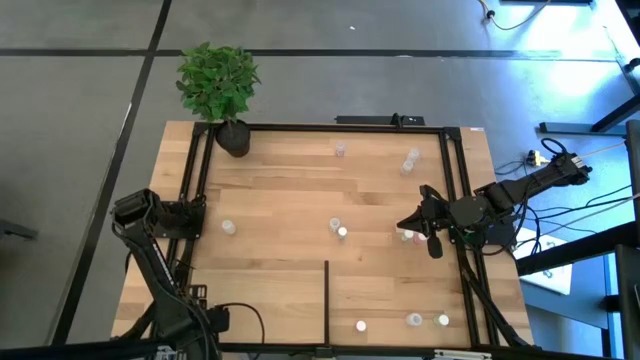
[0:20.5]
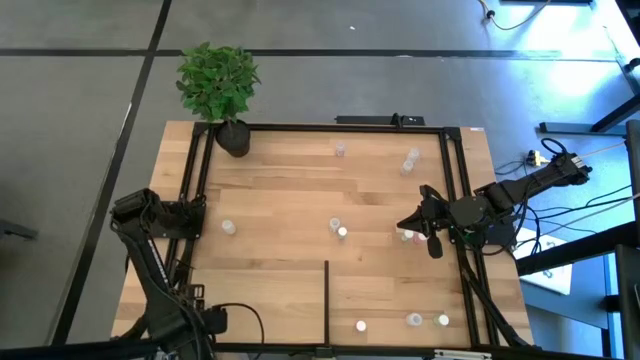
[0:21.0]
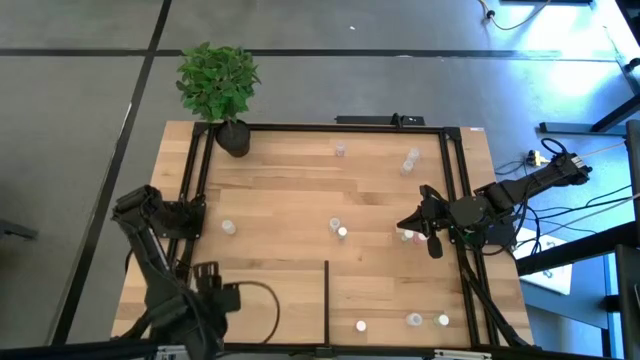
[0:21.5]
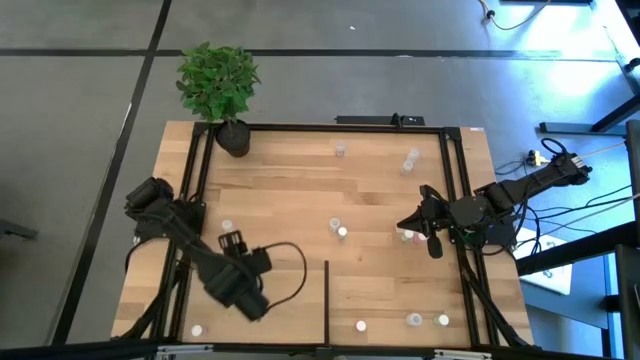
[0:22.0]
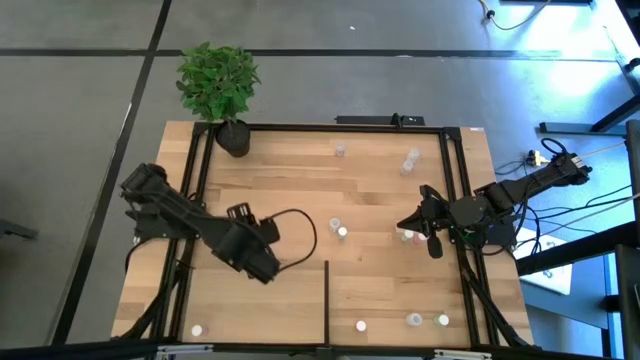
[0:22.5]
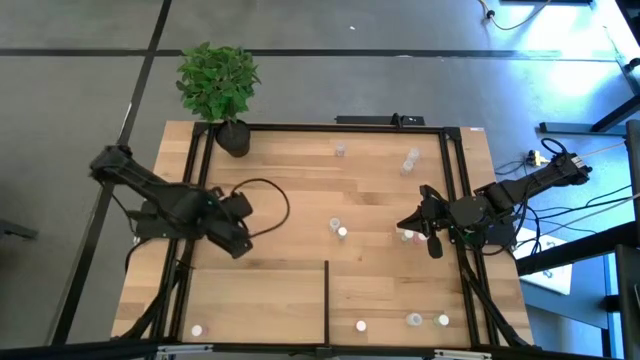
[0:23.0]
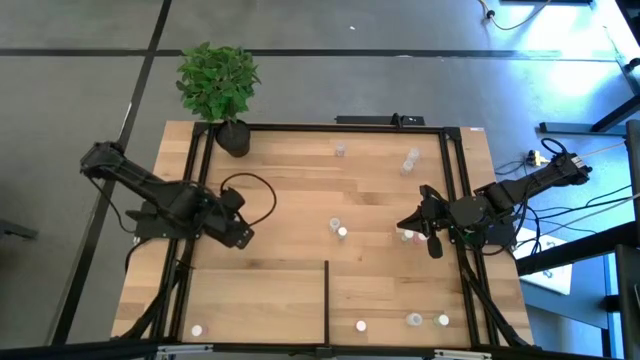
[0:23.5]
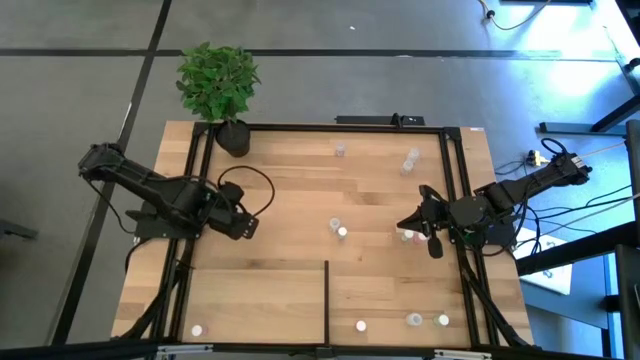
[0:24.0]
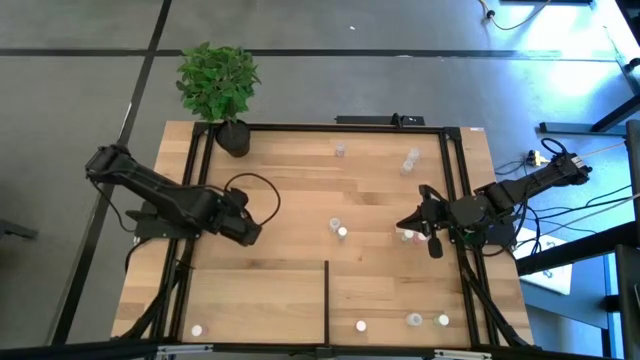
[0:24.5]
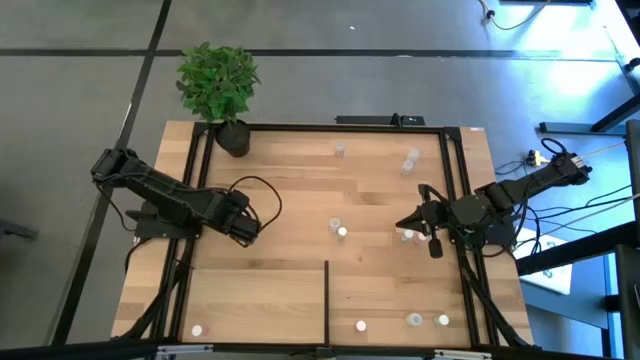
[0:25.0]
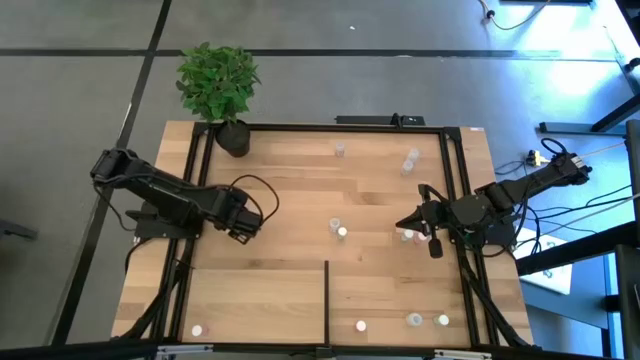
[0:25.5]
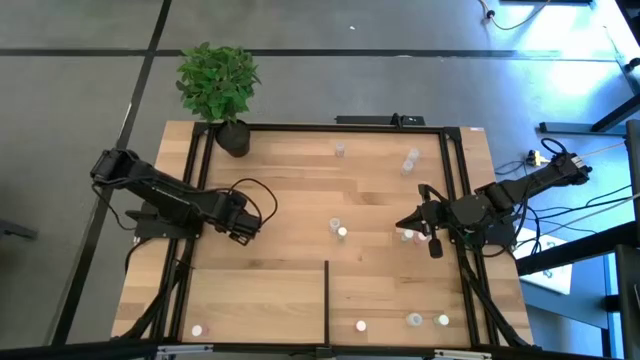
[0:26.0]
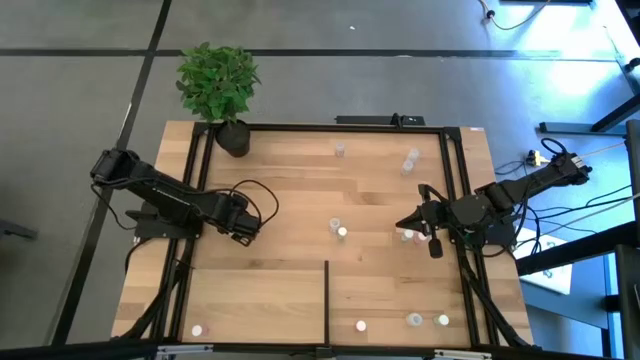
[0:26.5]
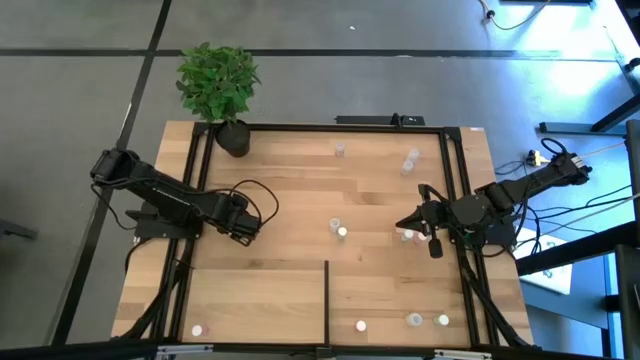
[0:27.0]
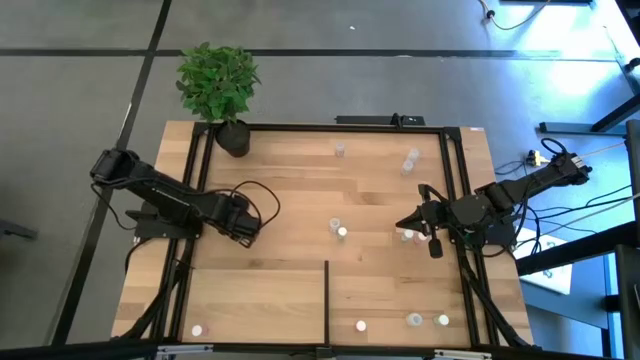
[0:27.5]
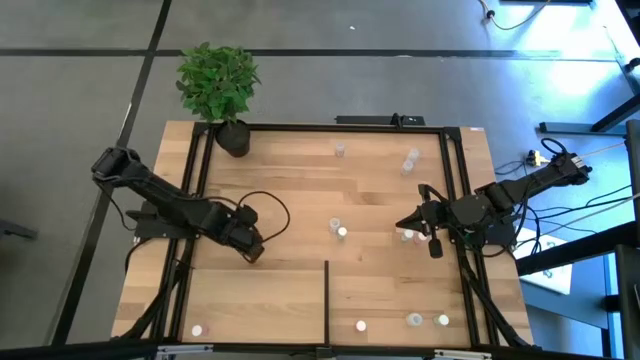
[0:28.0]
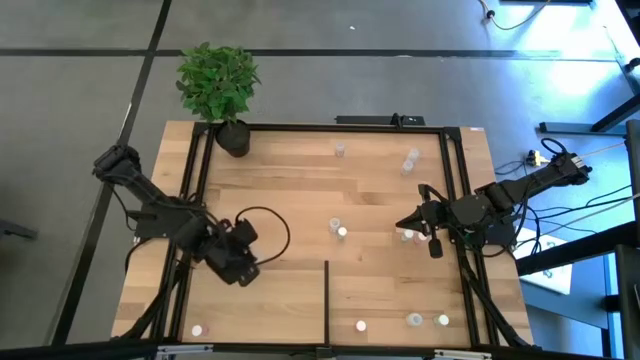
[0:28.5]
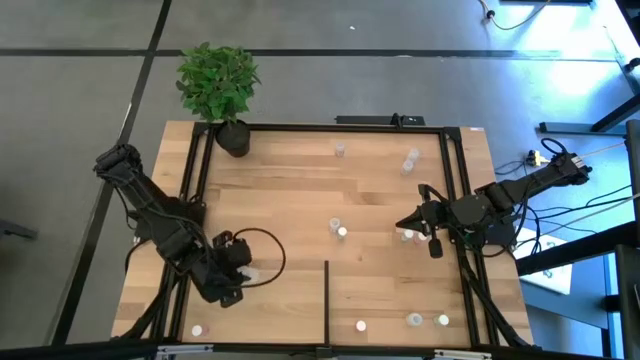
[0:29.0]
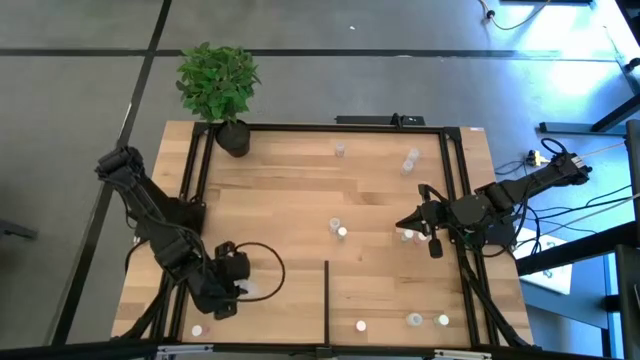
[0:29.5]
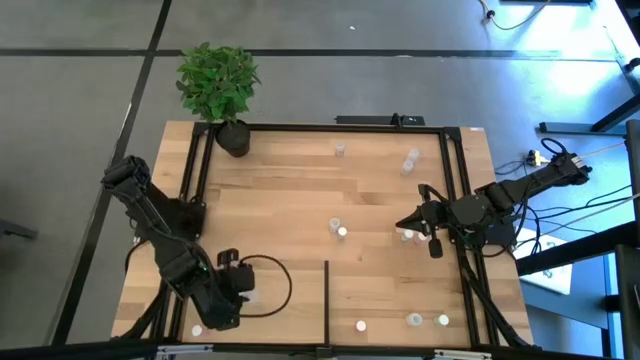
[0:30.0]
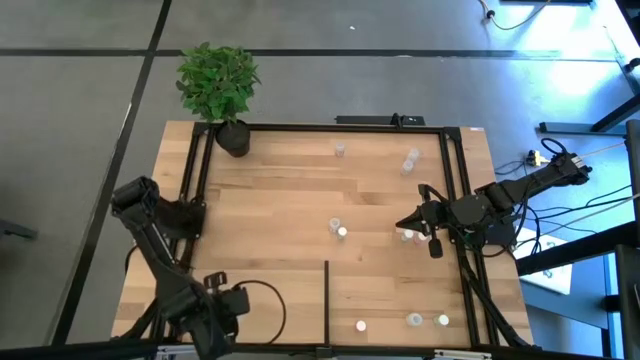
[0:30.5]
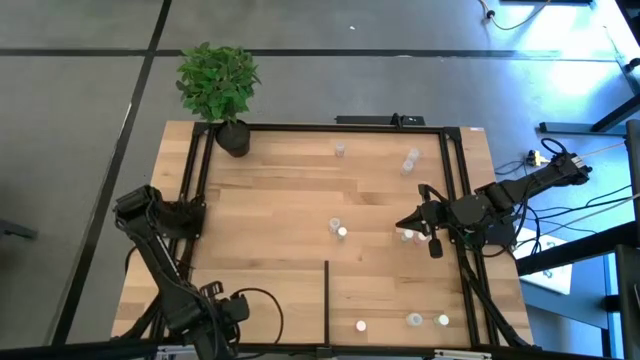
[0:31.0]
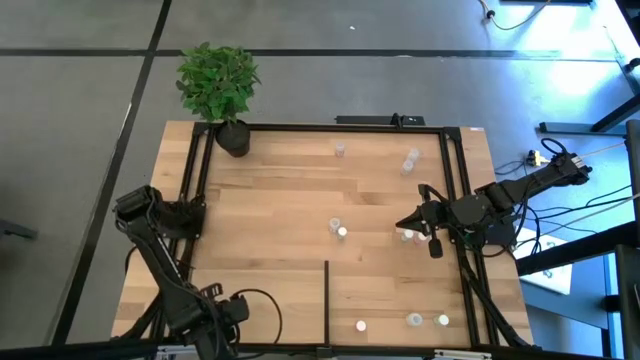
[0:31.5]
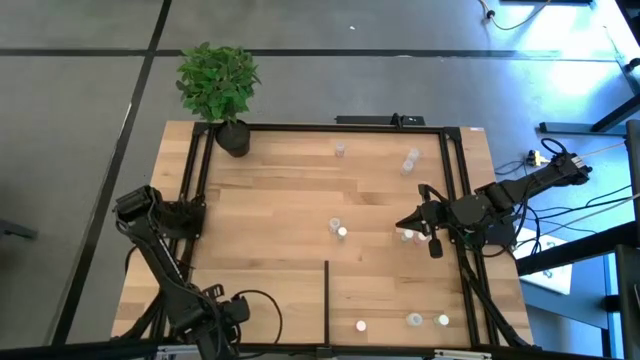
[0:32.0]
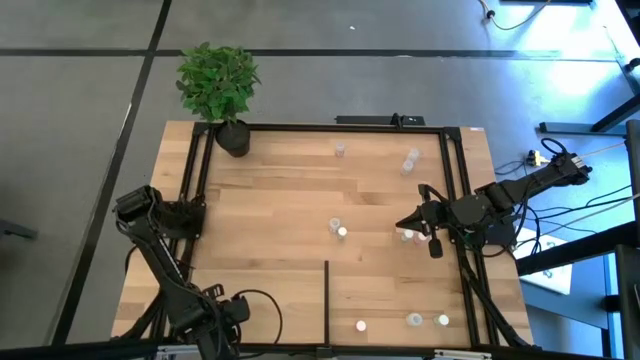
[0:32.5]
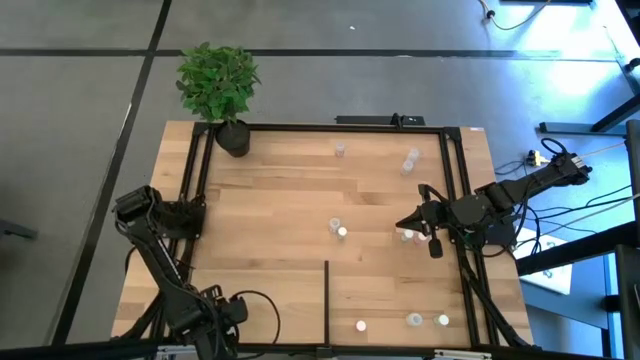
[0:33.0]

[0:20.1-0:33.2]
Task: Pick and place medicine bottles onto shelf by color
Put the middle white pill bottle on the shelf

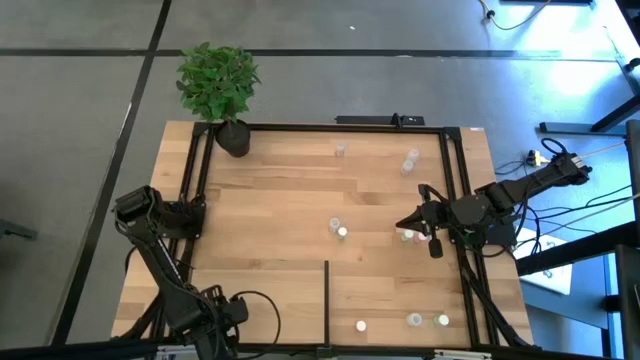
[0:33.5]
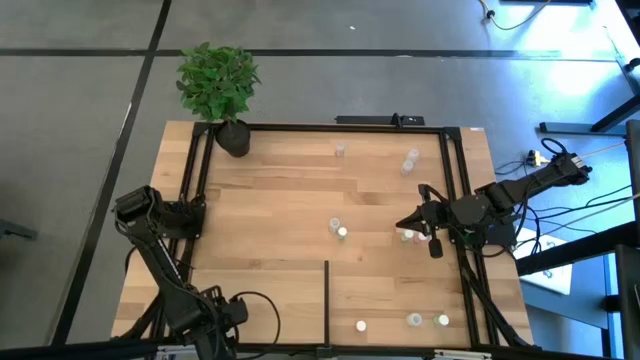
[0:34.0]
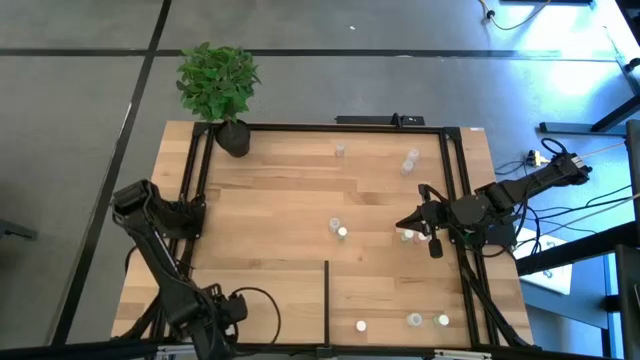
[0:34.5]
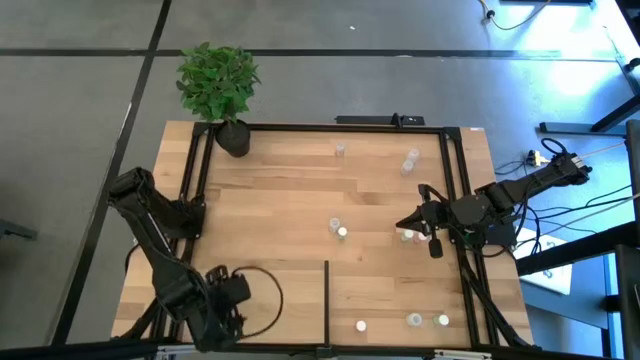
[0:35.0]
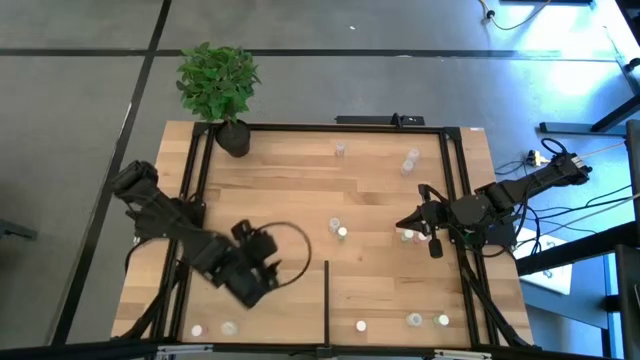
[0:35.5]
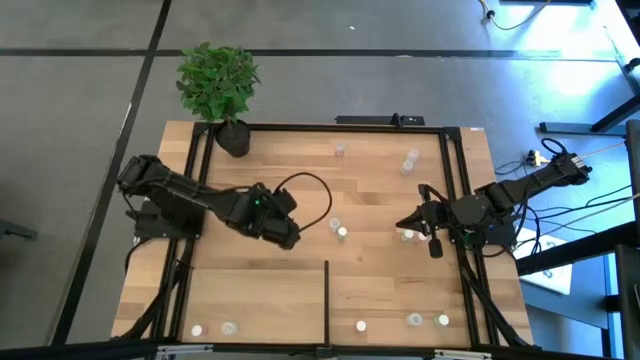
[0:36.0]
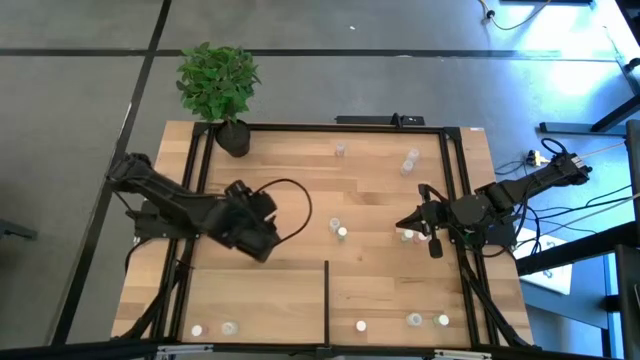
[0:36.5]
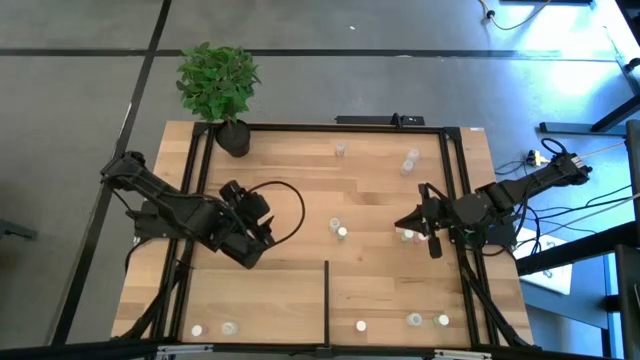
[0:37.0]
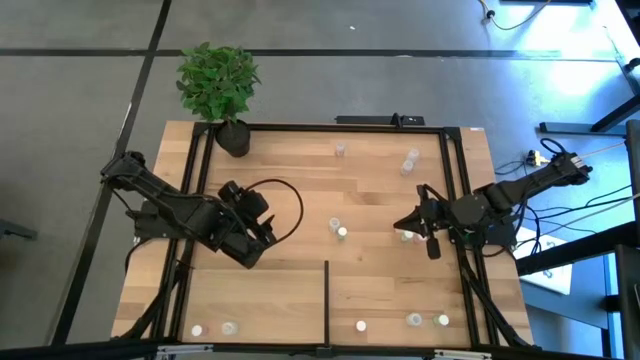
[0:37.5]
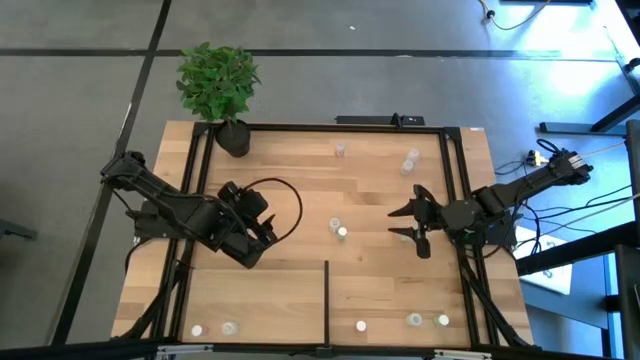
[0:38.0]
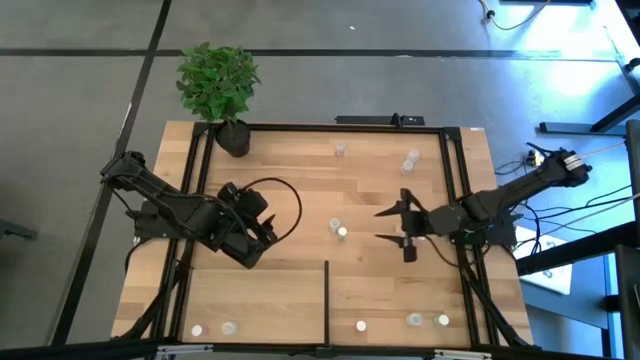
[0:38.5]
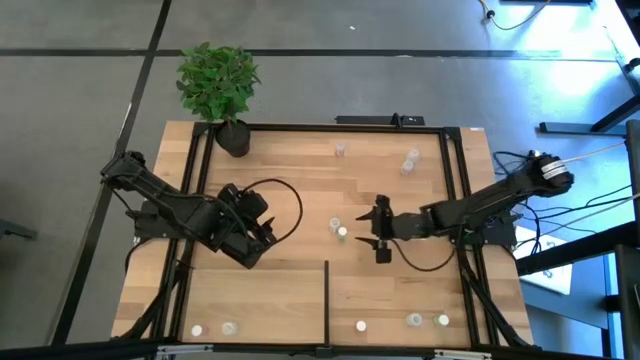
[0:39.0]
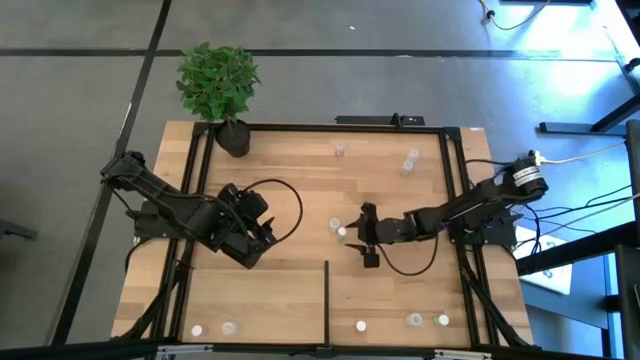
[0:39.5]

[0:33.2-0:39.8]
Put the top left green pill bottle on the shelf

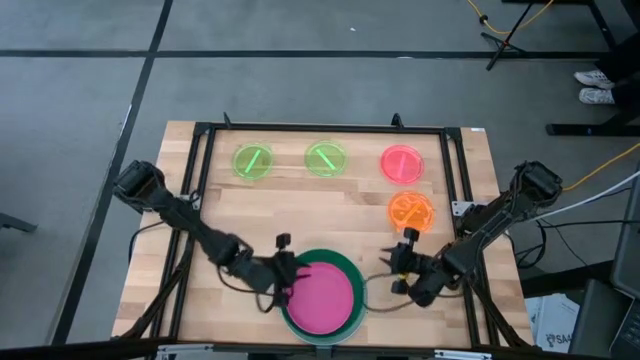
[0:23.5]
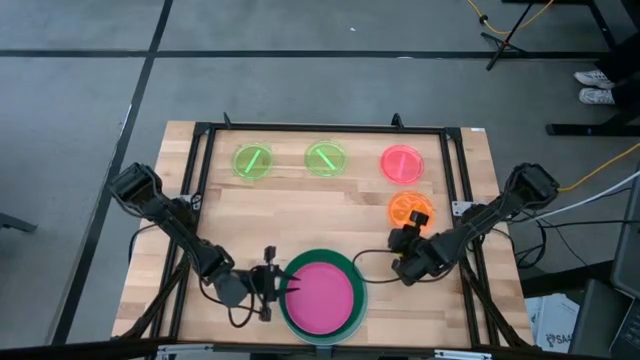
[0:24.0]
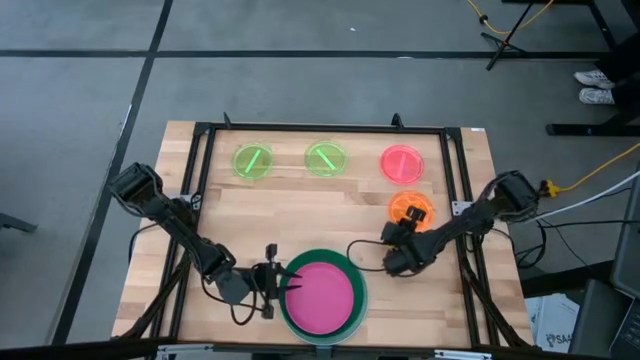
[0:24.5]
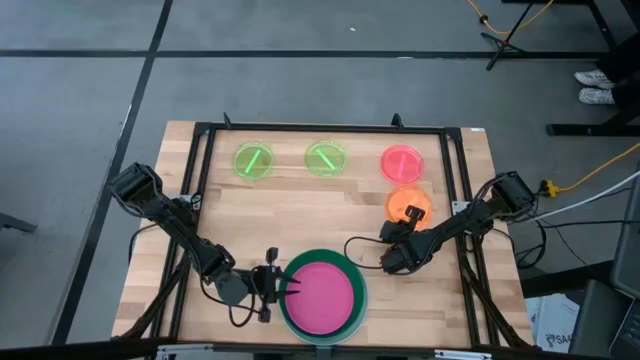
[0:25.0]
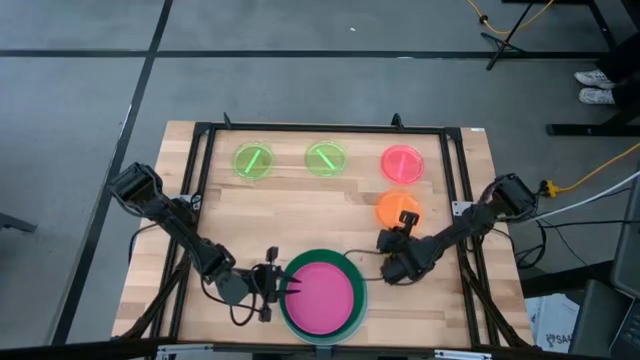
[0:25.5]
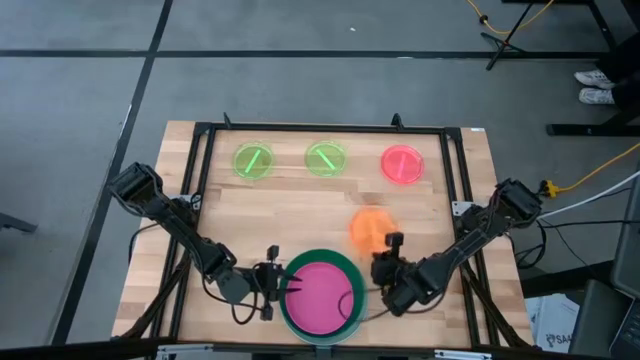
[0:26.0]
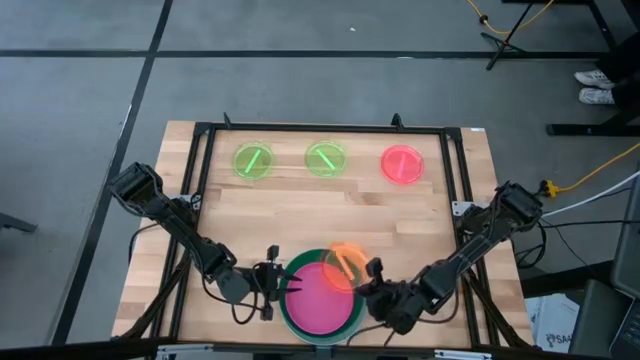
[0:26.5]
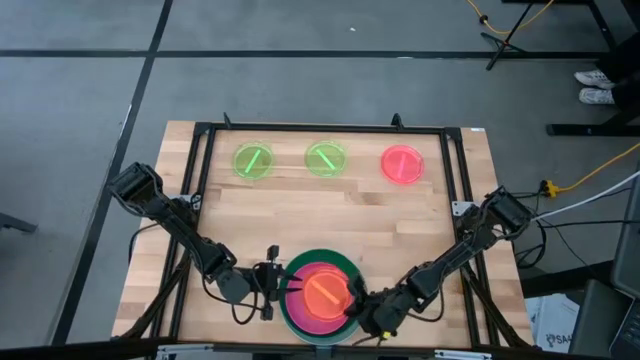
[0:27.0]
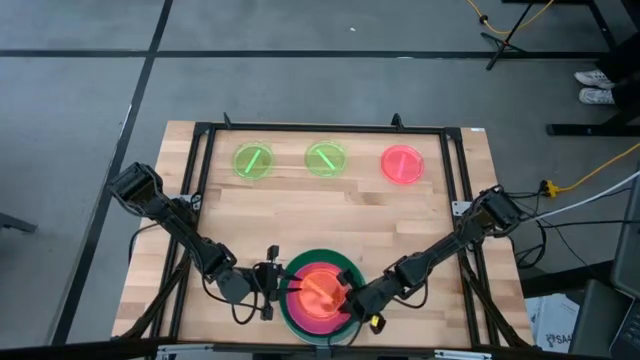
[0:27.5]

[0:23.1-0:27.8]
Task: Stack plastic plates
Stack the orange plate on top of the pink plate
